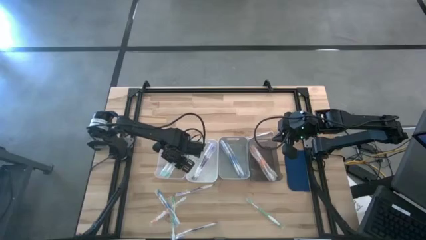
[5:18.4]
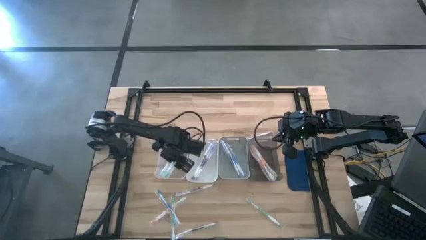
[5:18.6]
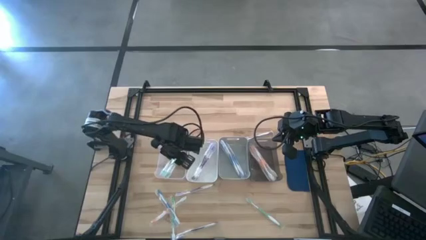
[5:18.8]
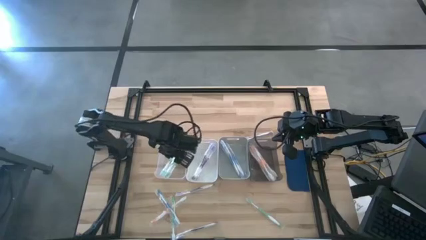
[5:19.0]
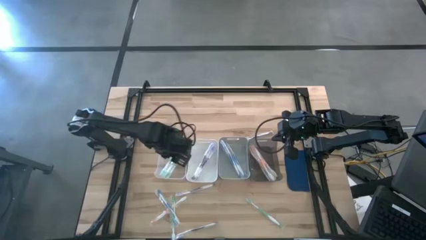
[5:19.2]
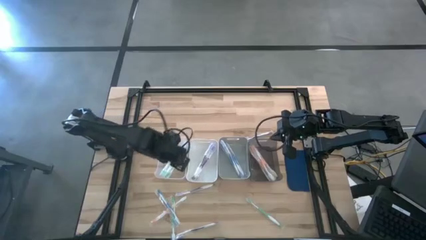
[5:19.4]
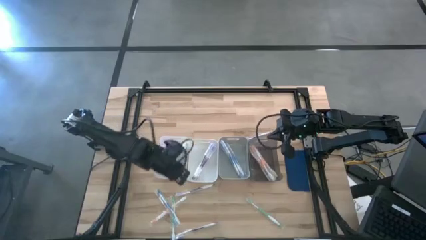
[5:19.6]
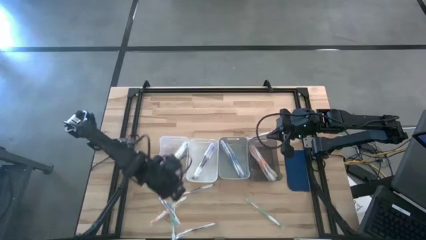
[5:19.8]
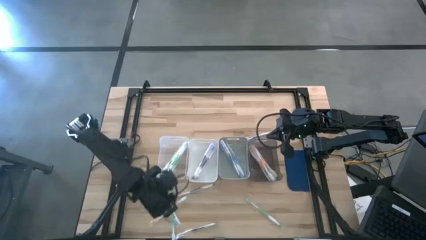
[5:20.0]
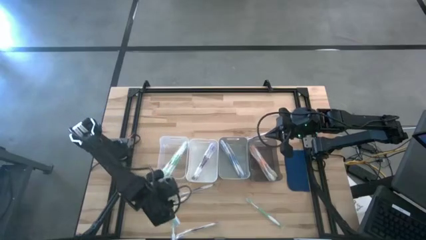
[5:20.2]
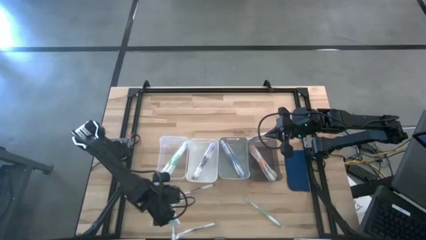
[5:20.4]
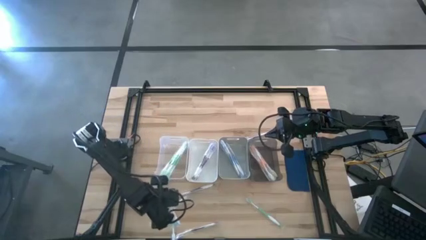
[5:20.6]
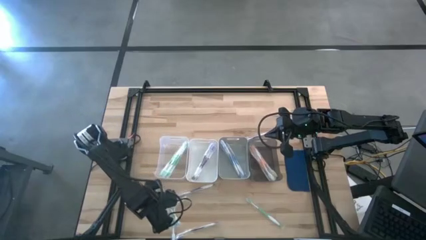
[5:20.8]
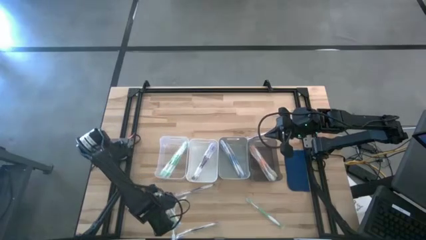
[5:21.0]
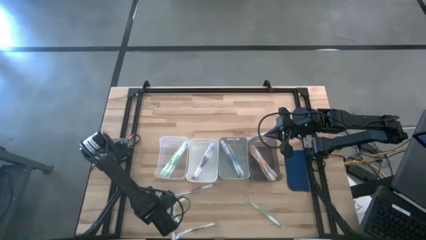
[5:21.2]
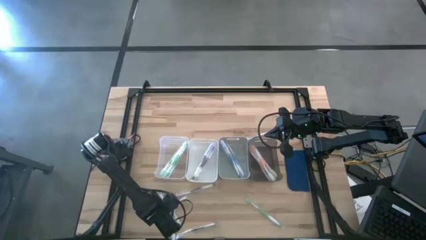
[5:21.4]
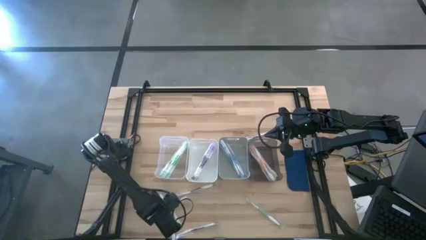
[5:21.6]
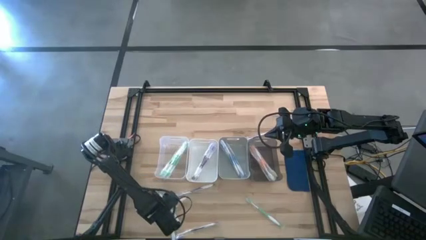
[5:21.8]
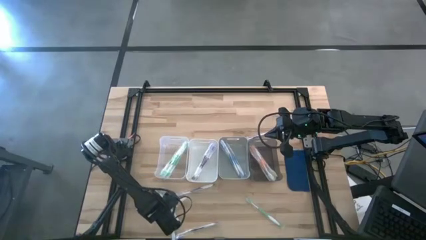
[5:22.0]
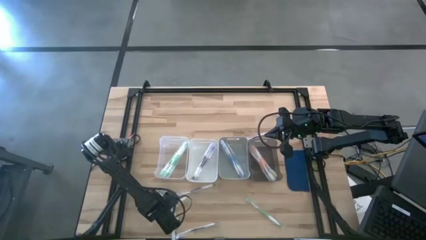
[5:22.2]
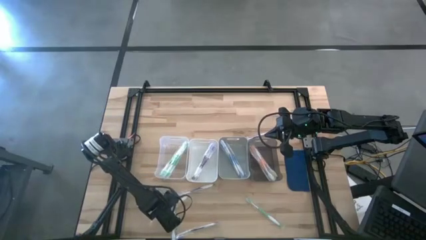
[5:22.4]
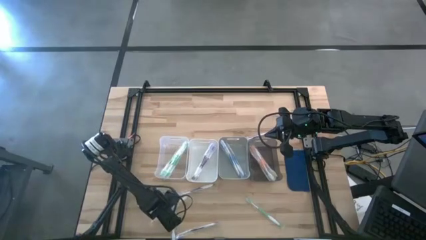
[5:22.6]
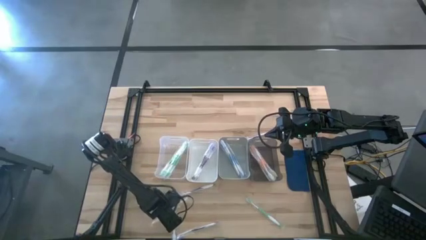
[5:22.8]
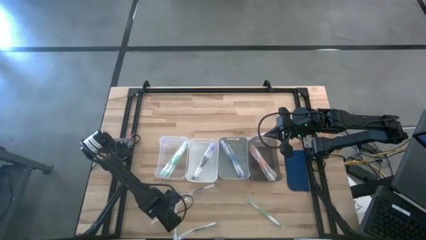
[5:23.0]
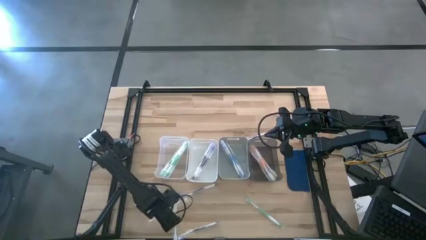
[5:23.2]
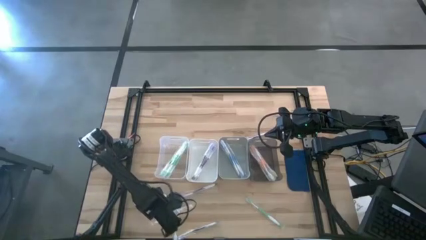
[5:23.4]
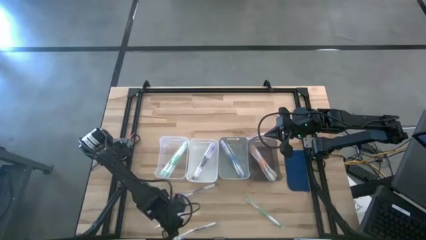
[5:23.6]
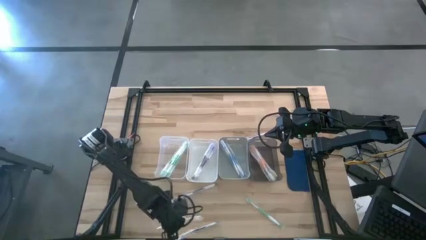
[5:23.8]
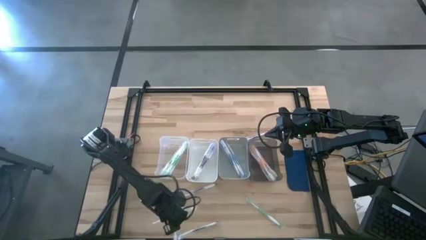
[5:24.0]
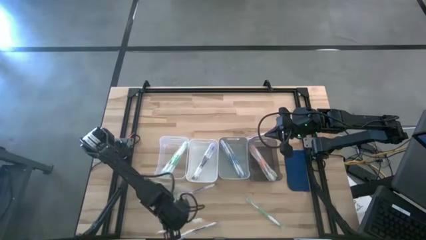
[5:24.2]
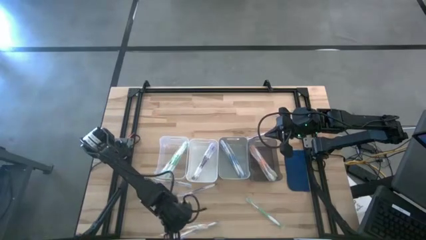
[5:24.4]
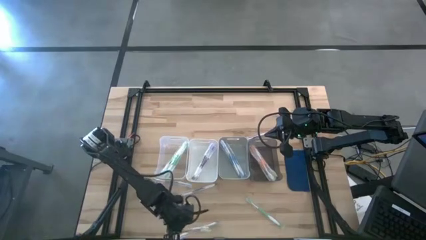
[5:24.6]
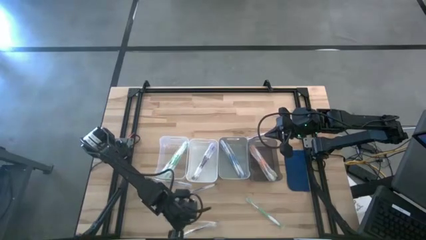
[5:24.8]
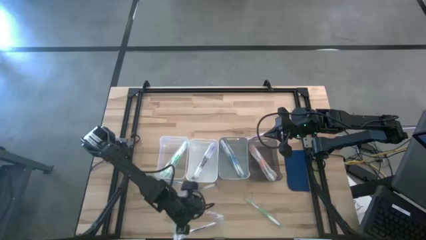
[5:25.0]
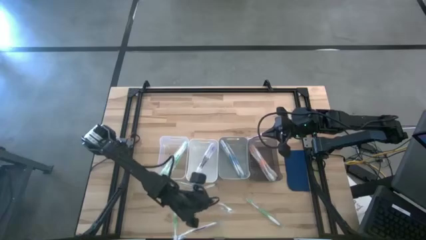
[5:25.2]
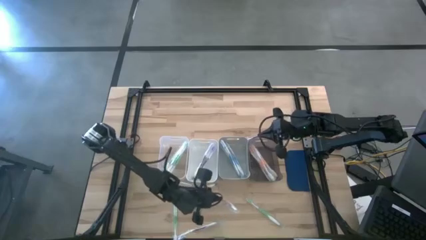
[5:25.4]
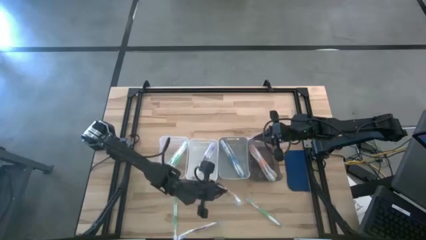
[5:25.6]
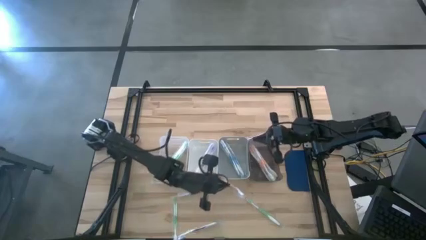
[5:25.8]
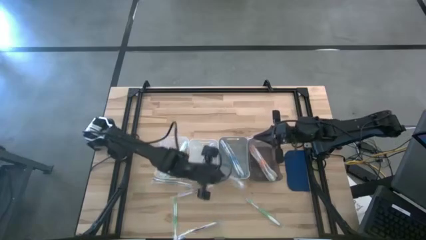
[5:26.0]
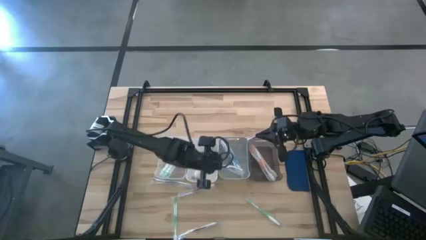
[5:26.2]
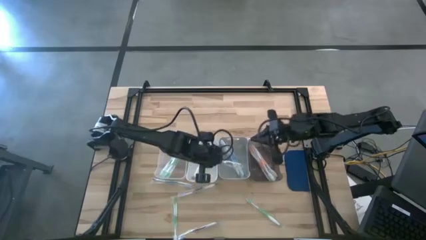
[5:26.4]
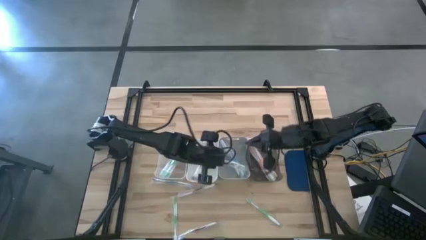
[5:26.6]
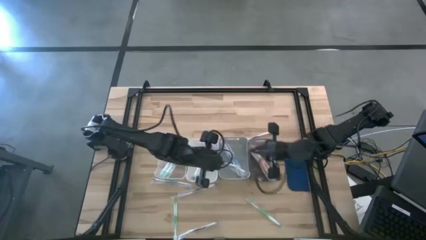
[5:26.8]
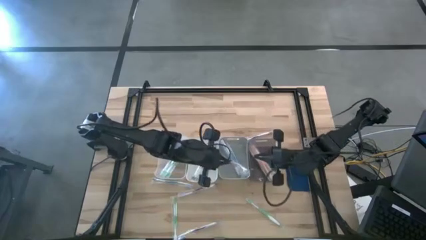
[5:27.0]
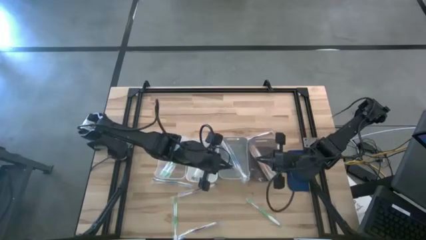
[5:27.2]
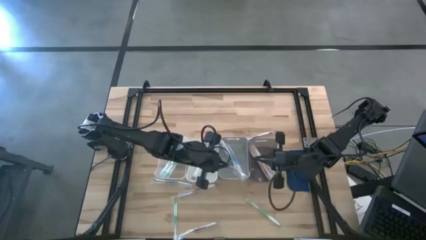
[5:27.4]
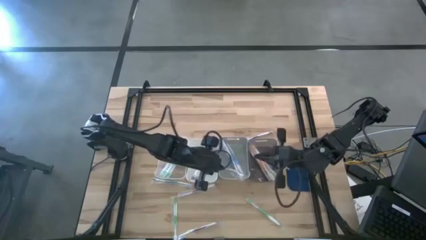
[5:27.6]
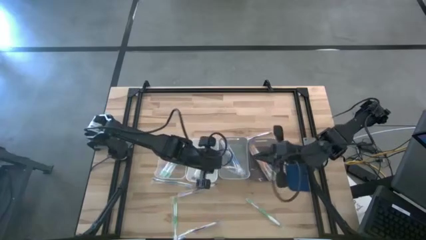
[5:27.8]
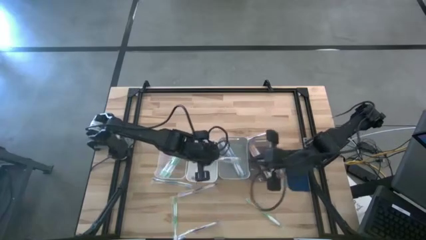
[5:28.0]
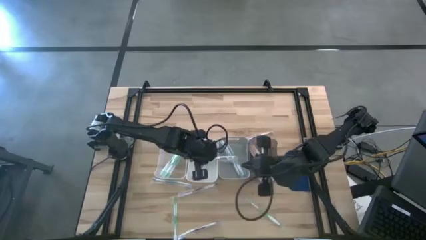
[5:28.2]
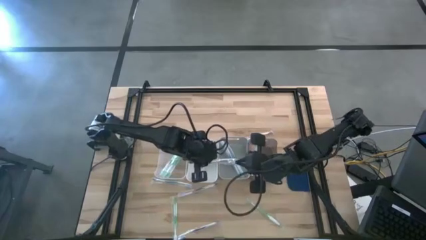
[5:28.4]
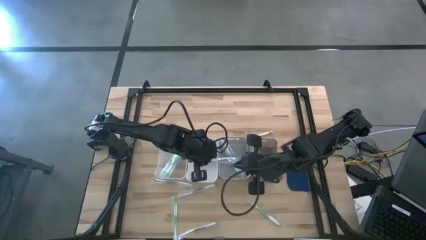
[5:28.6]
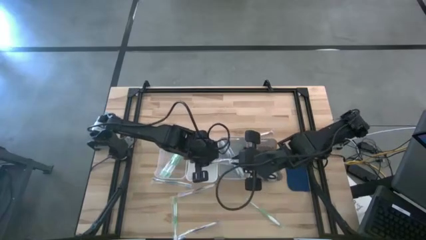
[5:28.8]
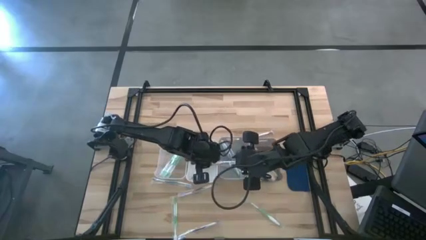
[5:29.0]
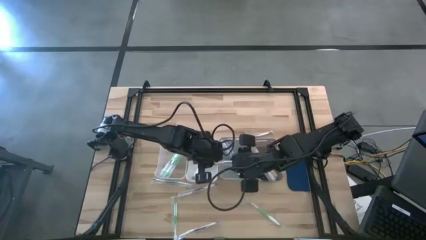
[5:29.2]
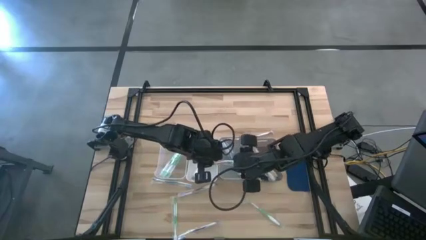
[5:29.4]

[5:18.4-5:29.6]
Task: Pick & Place Toothbrushes
Put the orange toothbrush into the black bin
